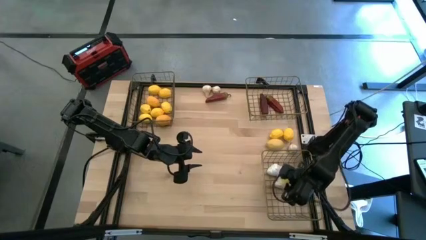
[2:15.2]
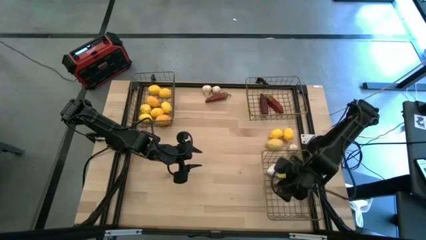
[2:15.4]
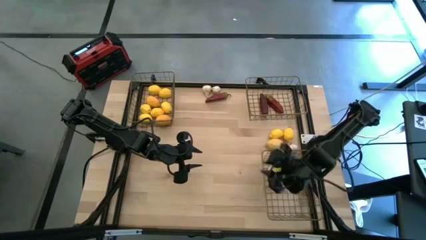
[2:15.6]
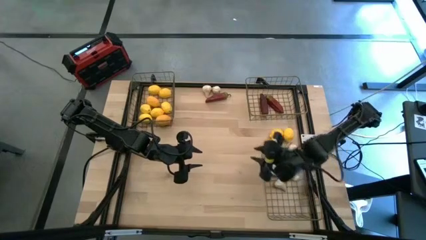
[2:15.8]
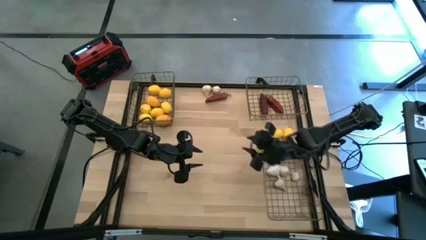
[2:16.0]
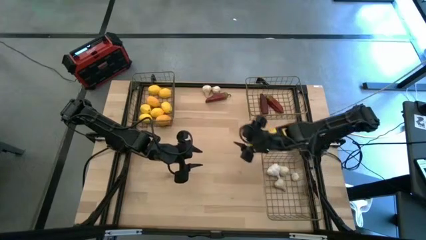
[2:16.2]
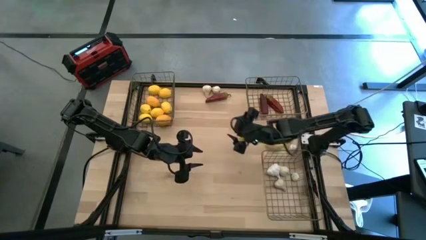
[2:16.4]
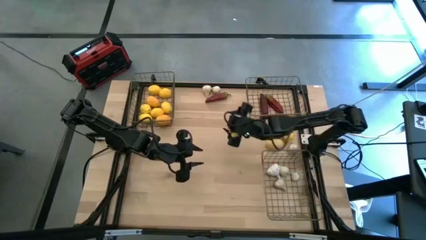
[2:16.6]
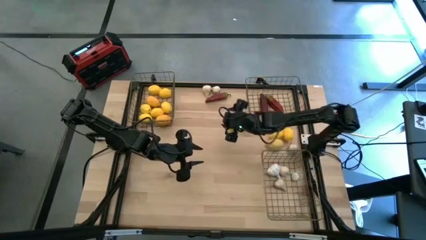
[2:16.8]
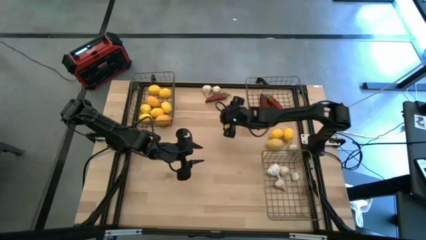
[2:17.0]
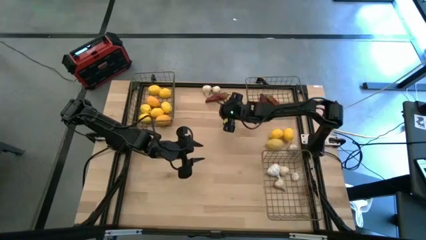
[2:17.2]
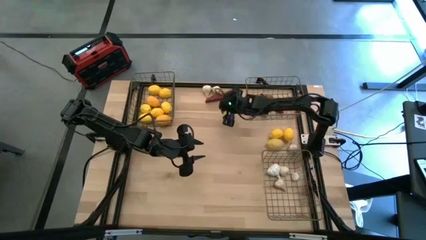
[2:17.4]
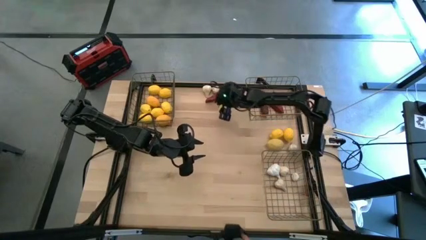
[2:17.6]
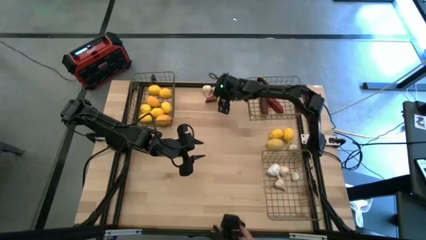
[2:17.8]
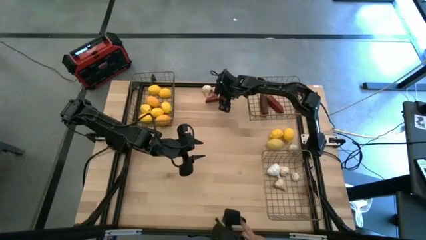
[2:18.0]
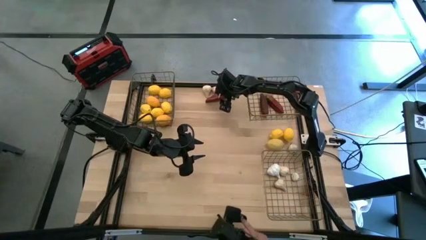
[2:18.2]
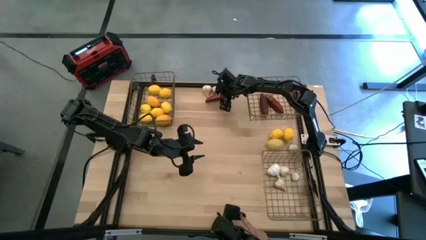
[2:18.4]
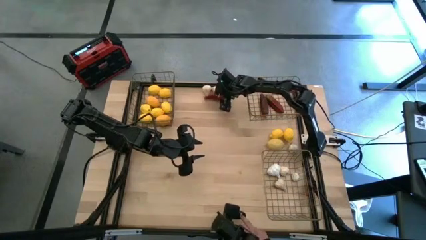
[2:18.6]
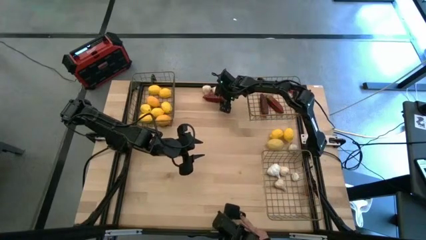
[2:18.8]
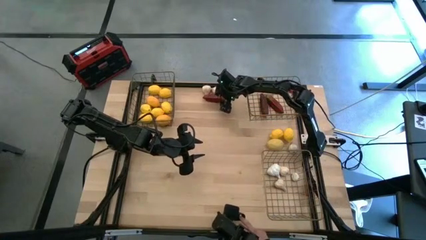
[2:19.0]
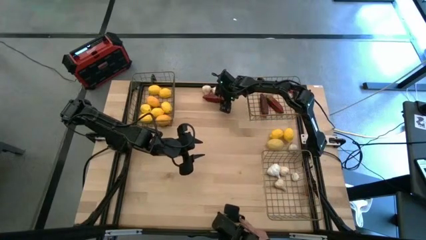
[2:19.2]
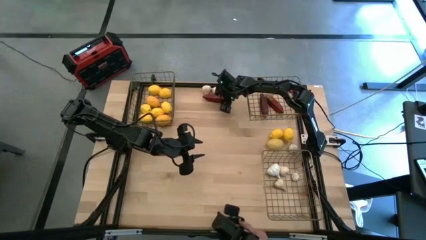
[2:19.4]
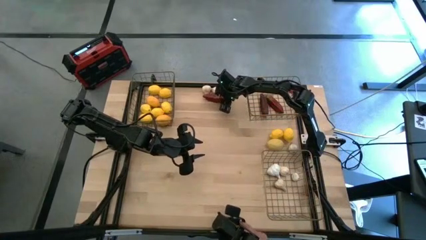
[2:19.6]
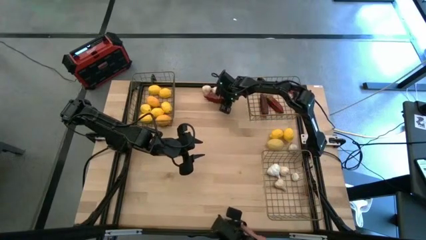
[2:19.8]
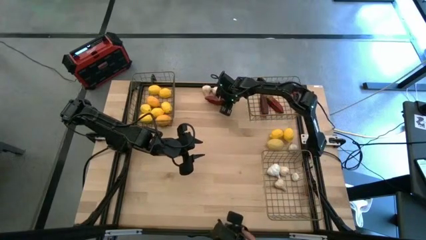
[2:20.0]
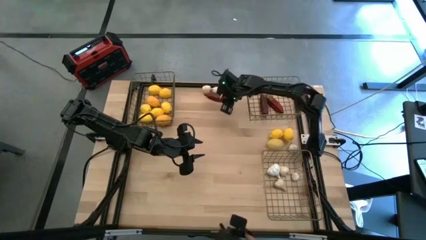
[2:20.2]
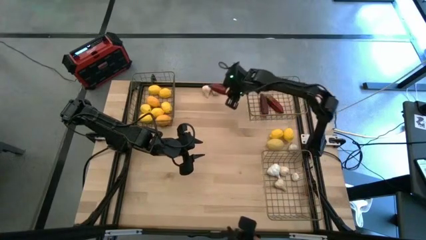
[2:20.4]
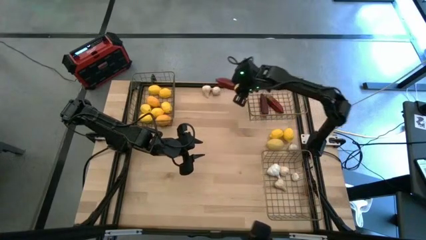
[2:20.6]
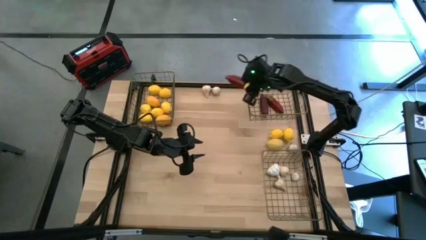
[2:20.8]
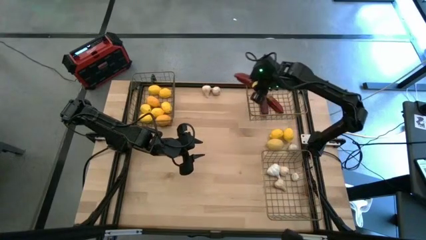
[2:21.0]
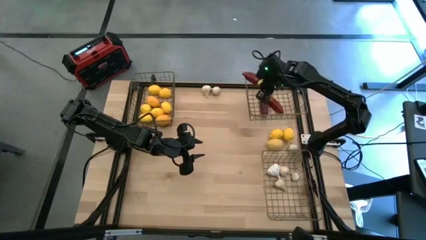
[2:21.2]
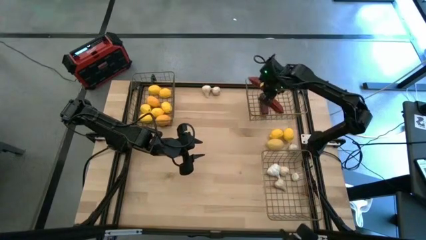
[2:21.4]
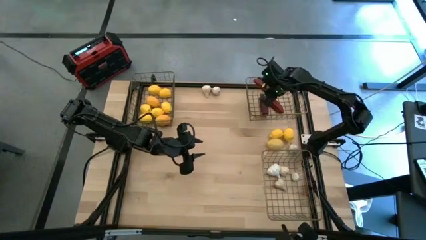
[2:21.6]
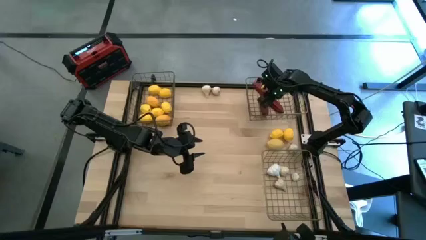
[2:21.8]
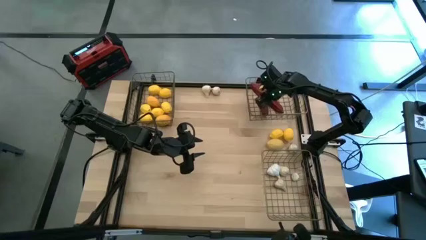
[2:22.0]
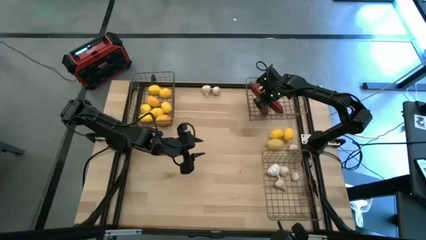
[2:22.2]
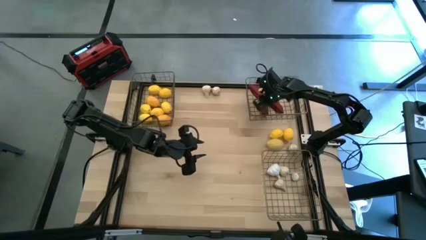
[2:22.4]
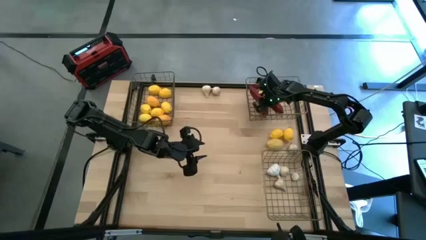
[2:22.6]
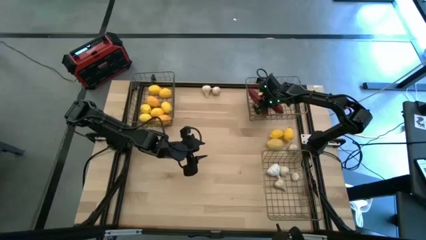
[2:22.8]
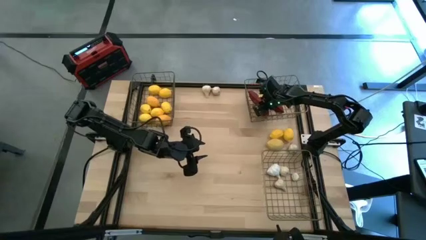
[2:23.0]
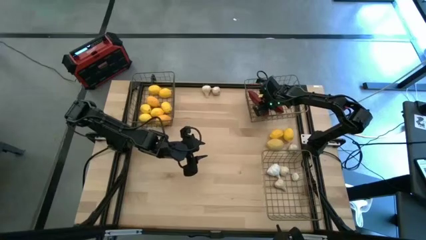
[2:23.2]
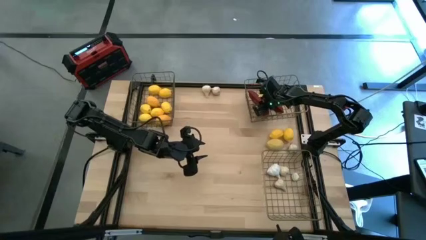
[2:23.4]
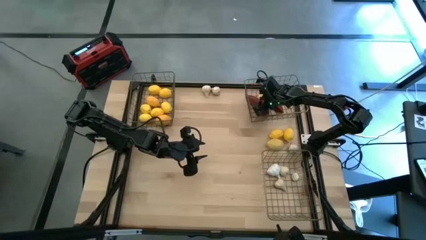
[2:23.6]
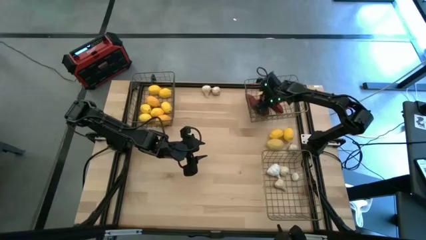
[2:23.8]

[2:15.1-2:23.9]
Task: Sort produce into baskets
Put the red chili pepper into the top right wire basket

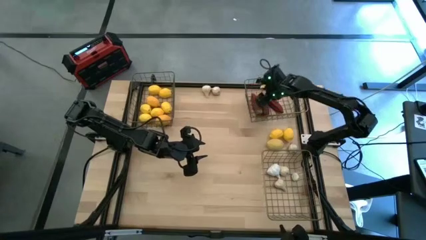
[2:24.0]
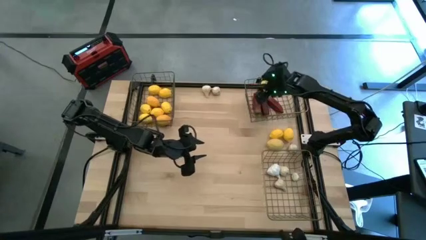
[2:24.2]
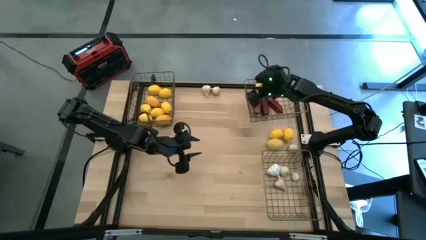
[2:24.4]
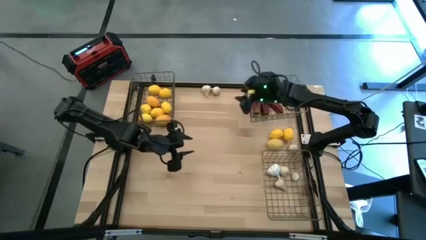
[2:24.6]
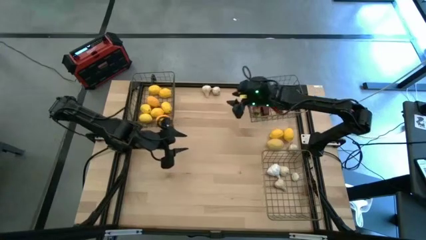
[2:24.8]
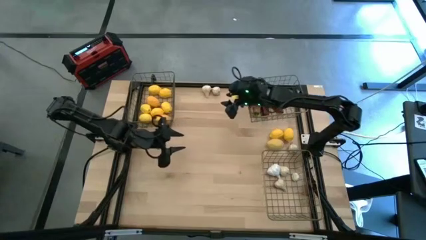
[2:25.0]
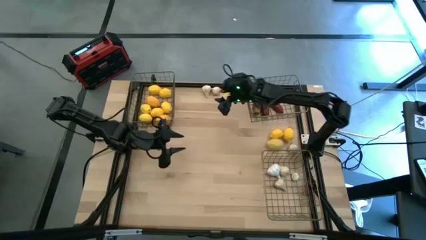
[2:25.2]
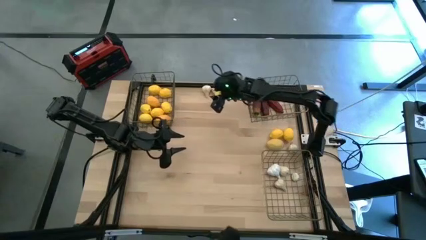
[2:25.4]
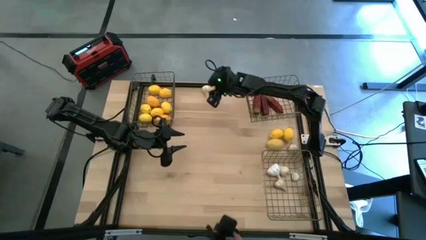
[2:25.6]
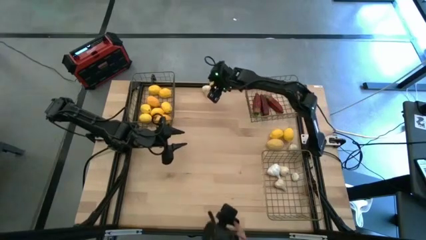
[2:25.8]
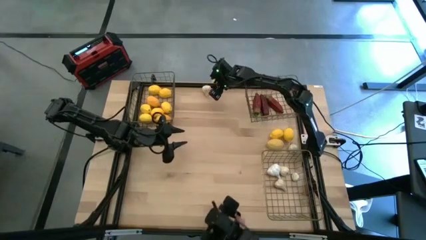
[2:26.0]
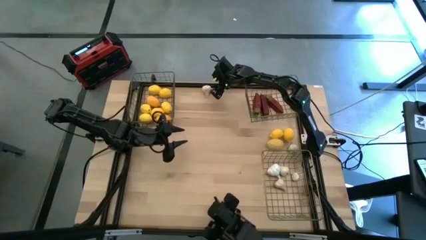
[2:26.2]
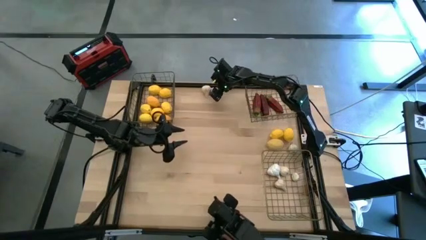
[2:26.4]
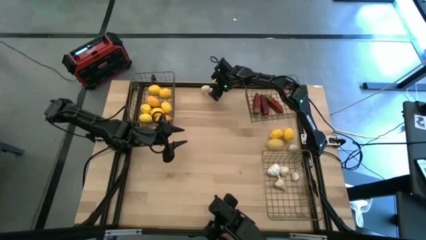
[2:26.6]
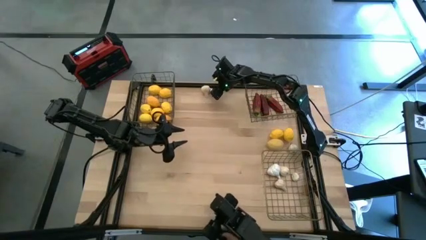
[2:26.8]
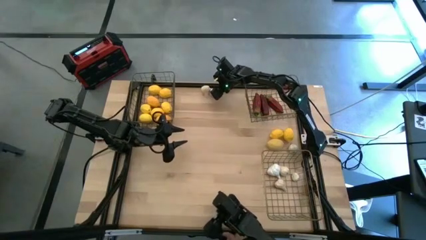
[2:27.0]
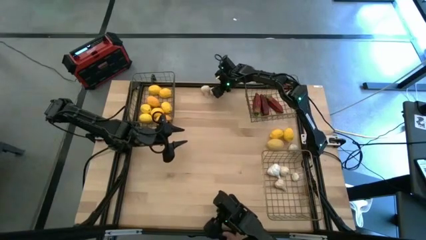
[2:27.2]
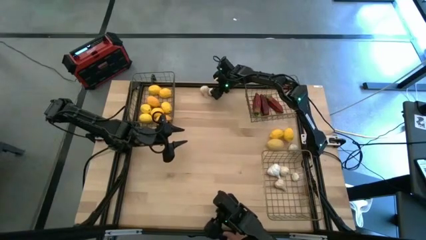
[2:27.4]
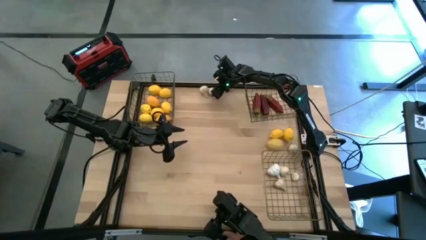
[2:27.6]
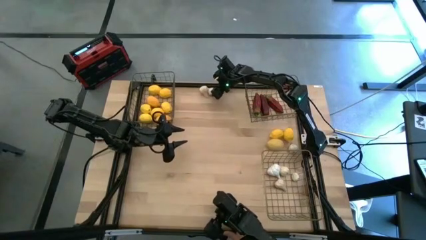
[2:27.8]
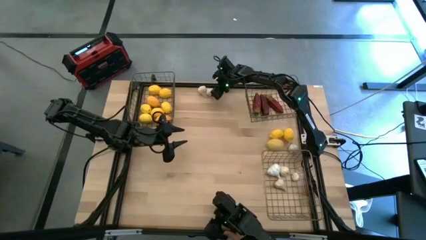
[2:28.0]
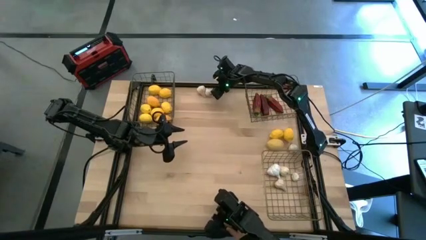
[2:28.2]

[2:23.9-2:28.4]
Put the white garlic into the bottom wire basket

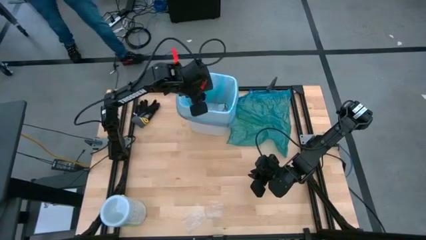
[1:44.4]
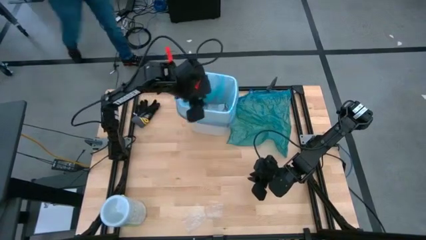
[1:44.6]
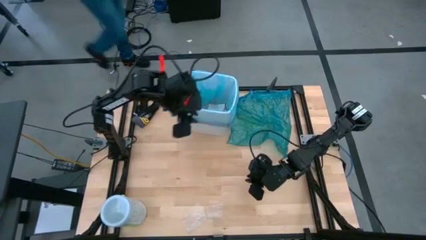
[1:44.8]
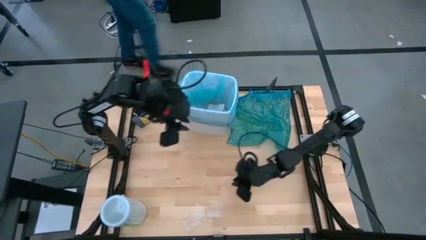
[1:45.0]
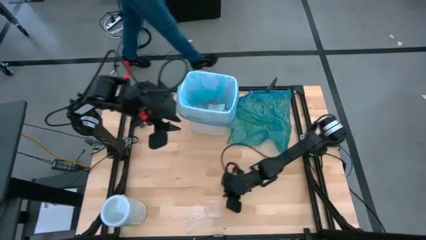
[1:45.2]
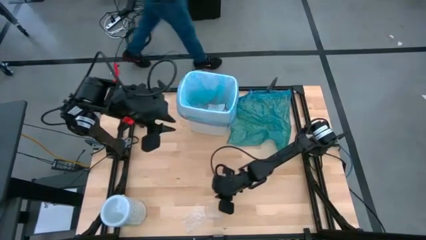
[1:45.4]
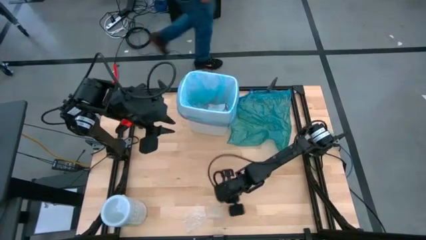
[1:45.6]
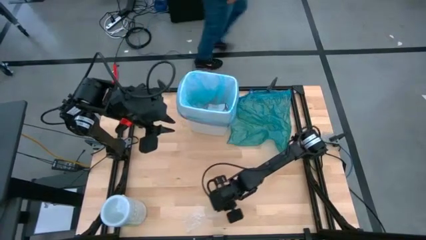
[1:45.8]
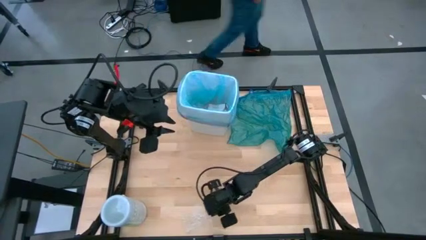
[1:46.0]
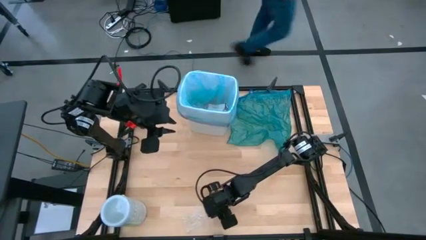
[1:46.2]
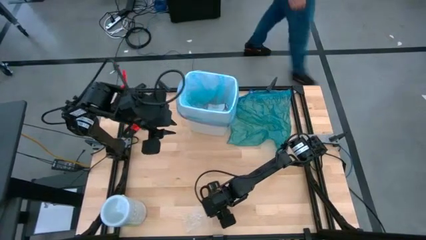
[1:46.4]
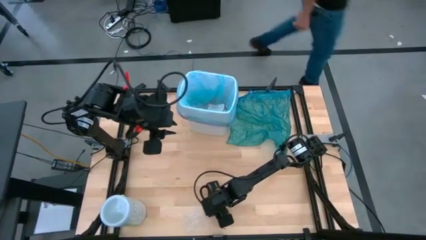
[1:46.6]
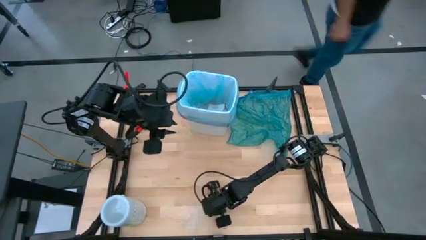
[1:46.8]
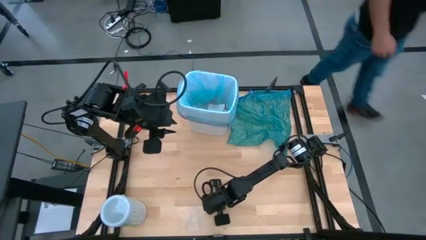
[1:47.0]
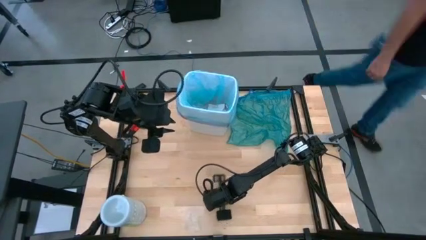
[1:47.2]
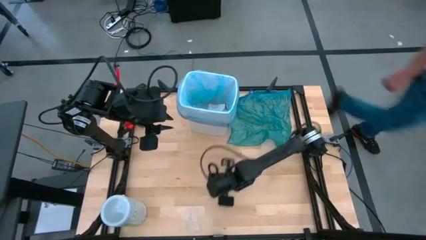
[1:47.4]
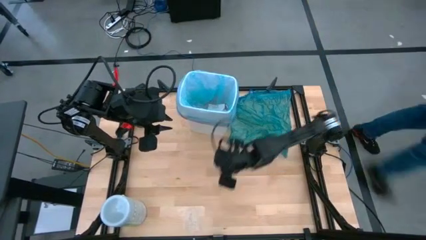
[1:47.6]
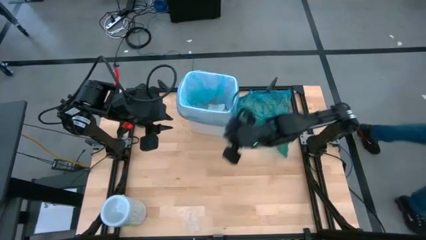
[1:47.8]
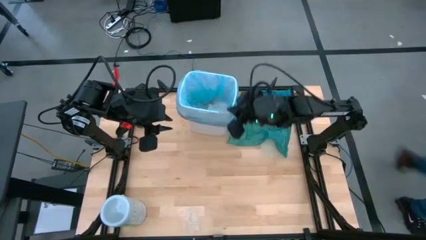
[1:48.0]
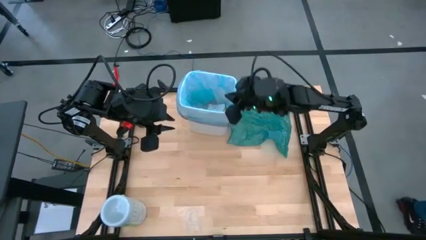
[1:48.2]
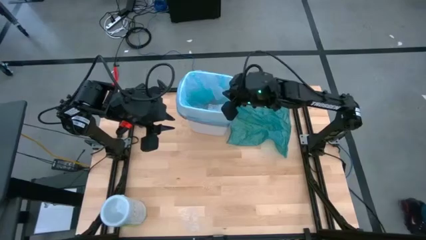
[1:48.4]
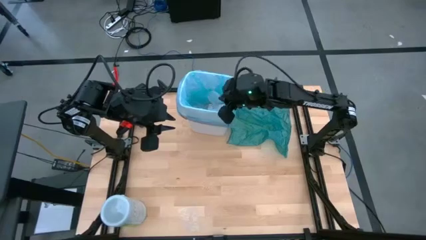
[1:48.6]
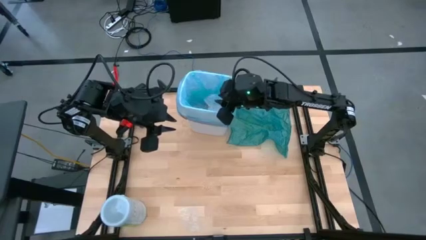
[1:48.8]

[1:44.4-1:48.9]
Task: place trash/remove bag and relplace
Put the transparent plastic into the trash bin
